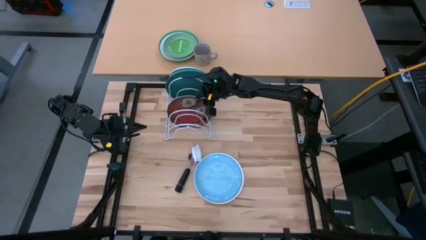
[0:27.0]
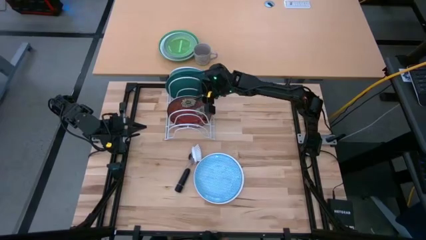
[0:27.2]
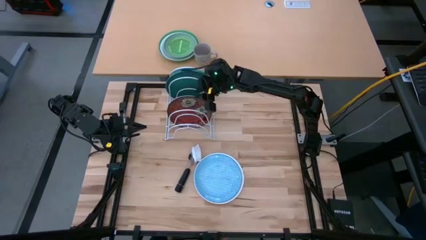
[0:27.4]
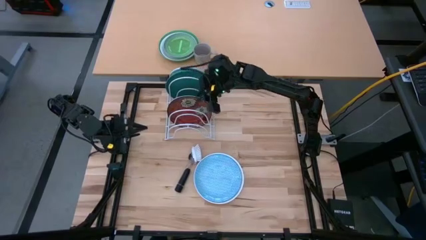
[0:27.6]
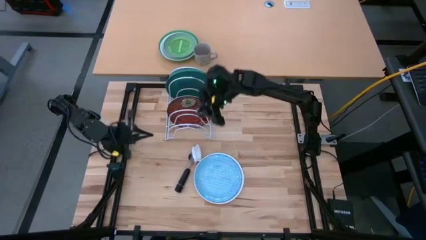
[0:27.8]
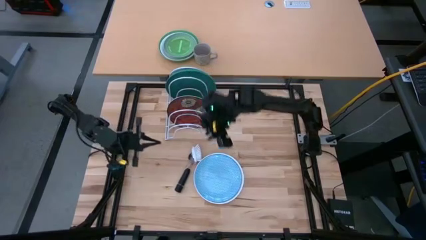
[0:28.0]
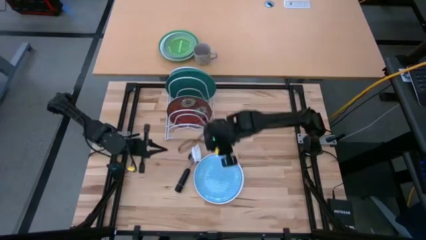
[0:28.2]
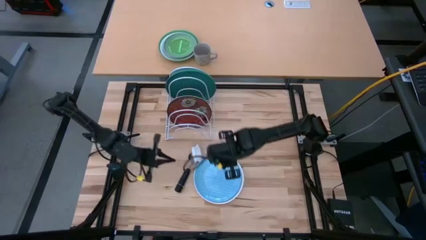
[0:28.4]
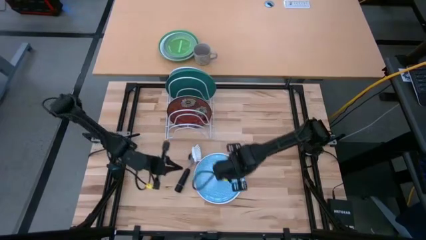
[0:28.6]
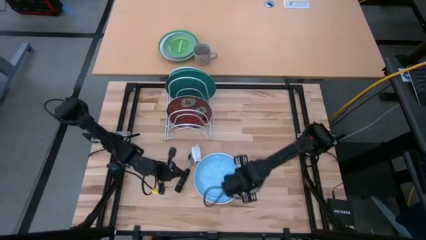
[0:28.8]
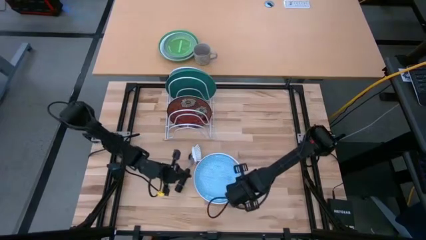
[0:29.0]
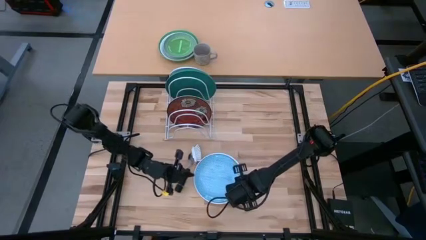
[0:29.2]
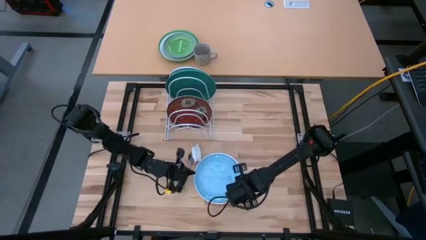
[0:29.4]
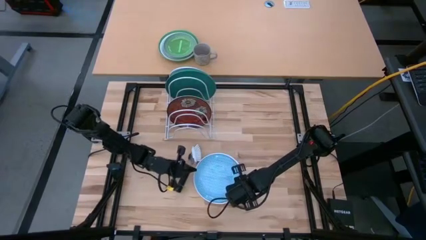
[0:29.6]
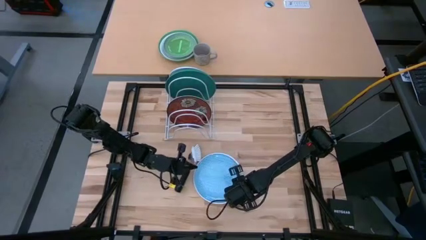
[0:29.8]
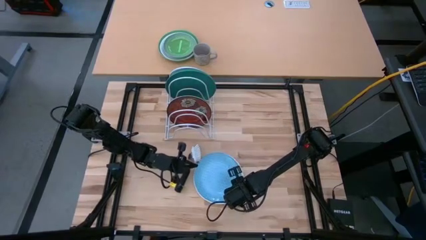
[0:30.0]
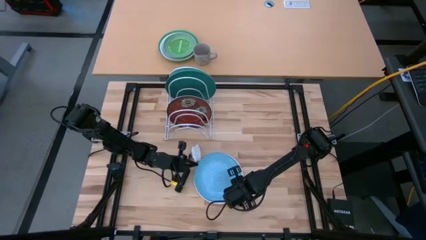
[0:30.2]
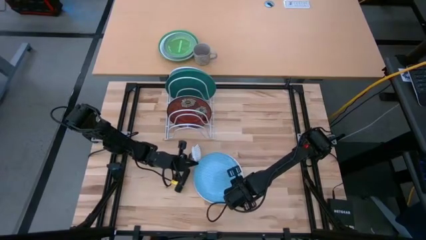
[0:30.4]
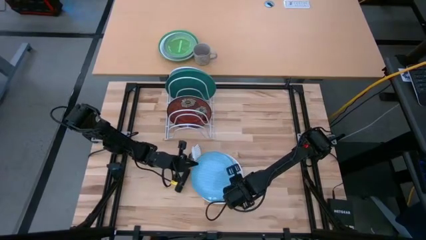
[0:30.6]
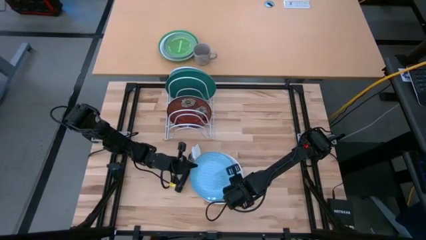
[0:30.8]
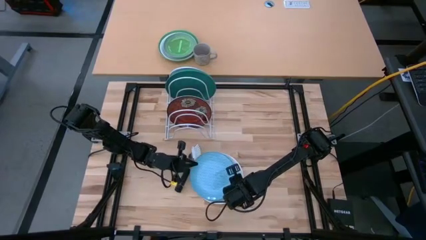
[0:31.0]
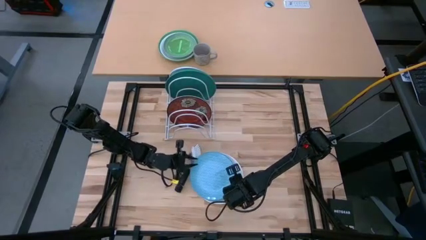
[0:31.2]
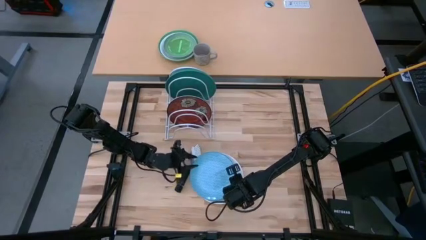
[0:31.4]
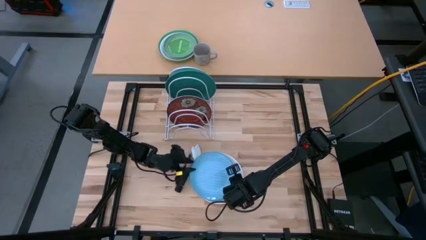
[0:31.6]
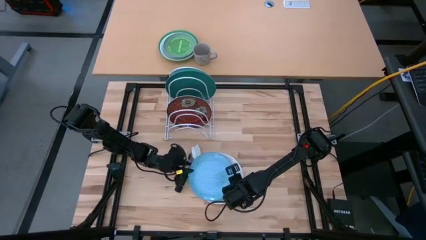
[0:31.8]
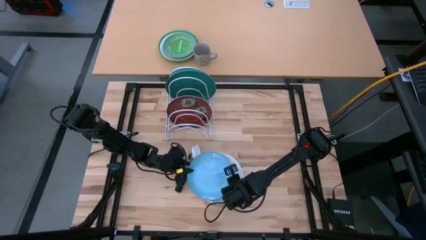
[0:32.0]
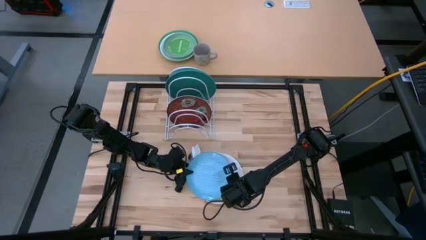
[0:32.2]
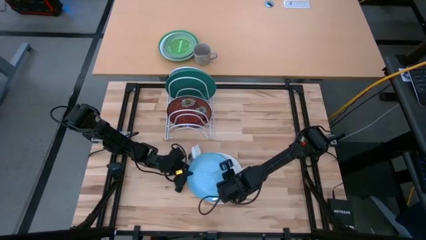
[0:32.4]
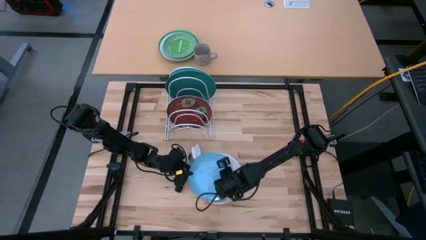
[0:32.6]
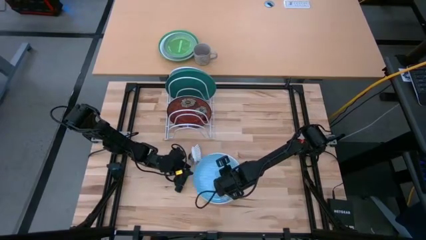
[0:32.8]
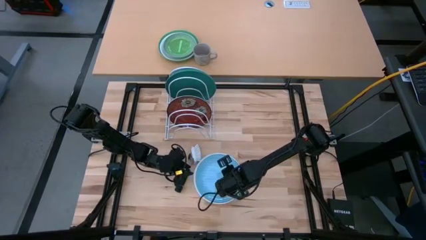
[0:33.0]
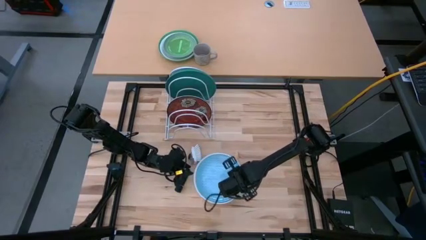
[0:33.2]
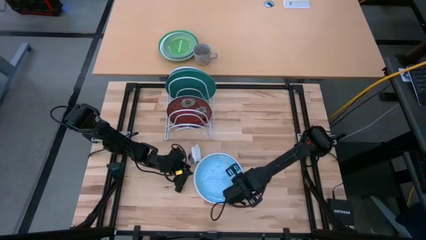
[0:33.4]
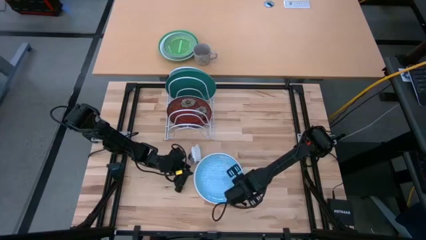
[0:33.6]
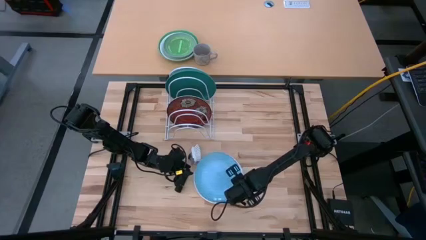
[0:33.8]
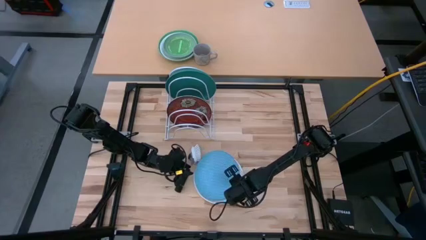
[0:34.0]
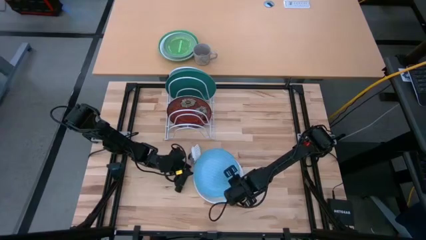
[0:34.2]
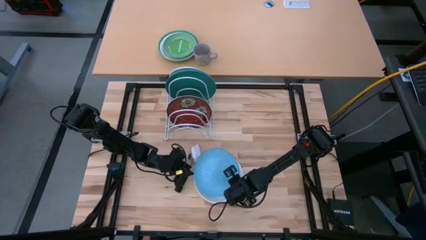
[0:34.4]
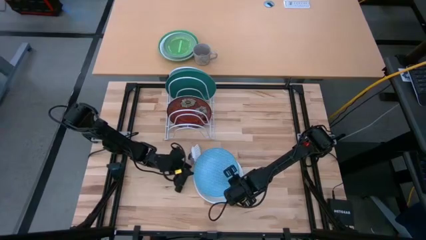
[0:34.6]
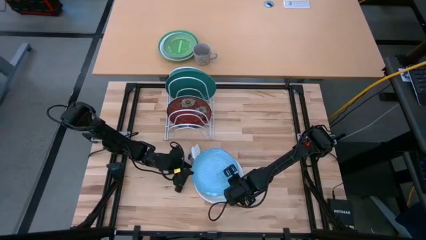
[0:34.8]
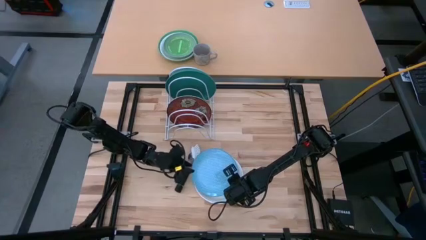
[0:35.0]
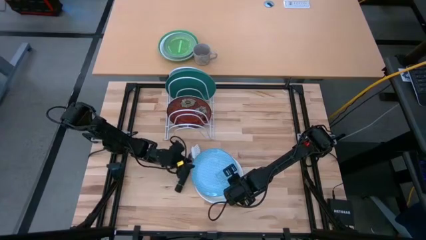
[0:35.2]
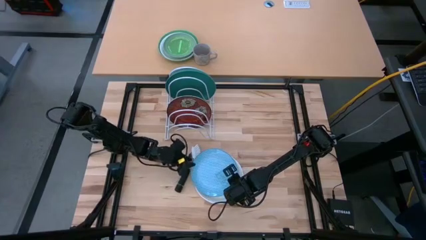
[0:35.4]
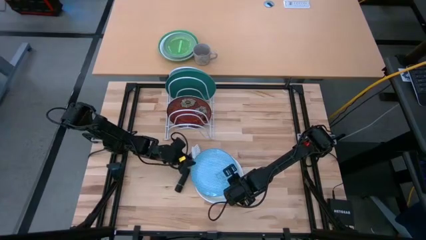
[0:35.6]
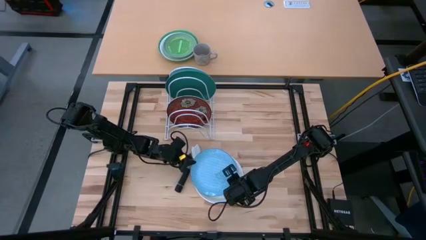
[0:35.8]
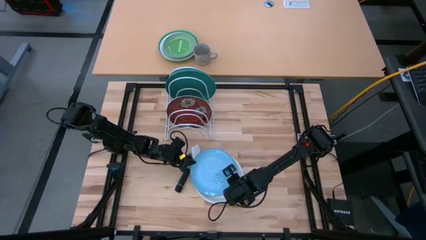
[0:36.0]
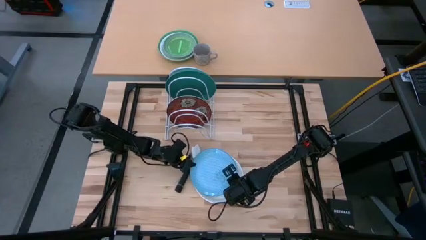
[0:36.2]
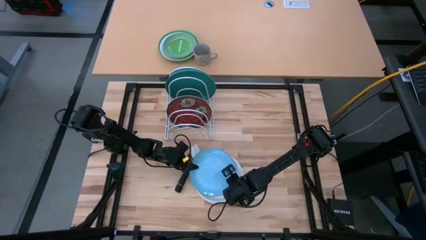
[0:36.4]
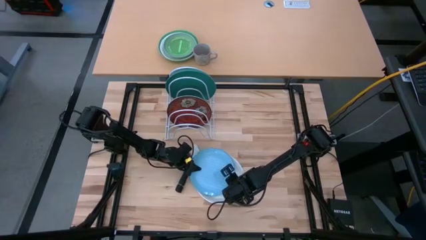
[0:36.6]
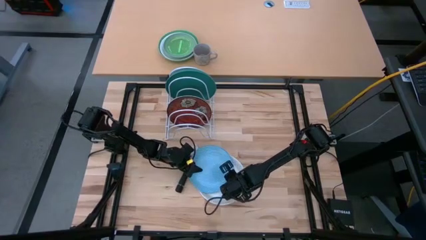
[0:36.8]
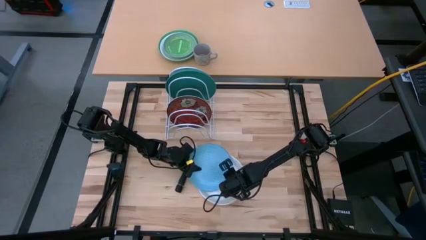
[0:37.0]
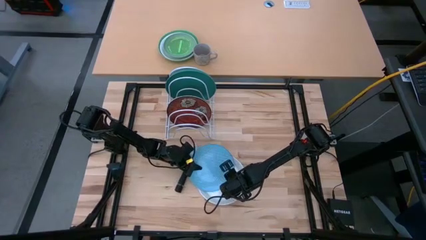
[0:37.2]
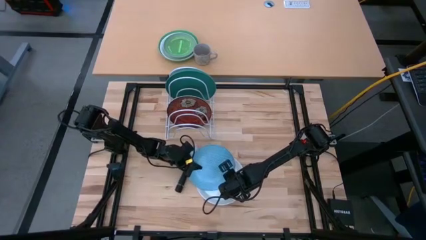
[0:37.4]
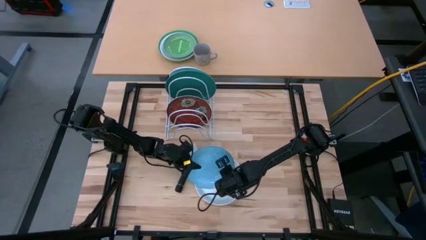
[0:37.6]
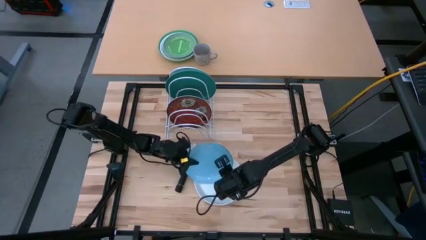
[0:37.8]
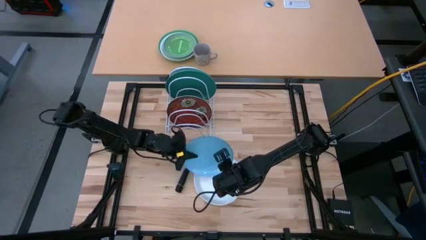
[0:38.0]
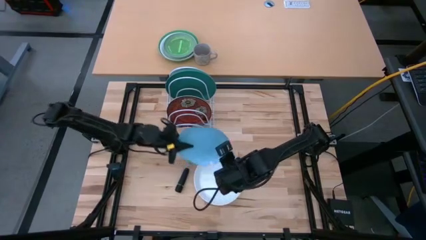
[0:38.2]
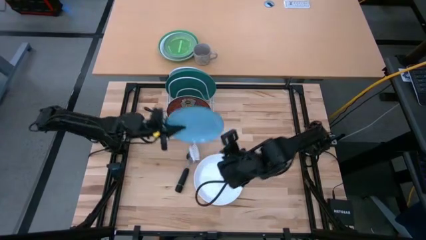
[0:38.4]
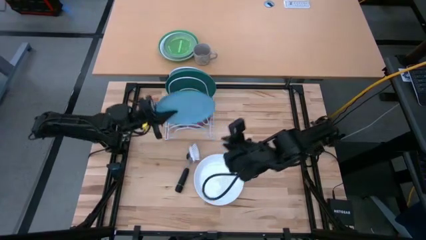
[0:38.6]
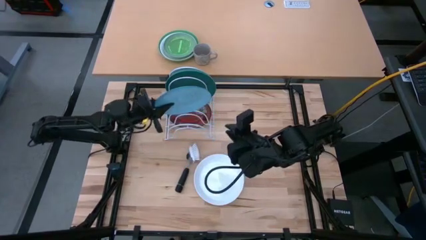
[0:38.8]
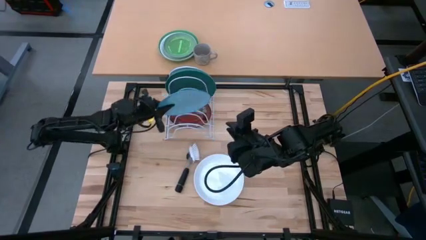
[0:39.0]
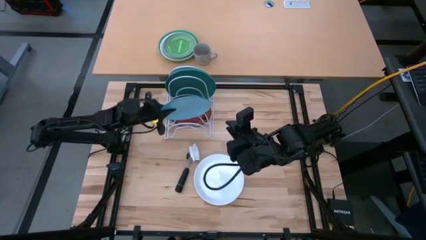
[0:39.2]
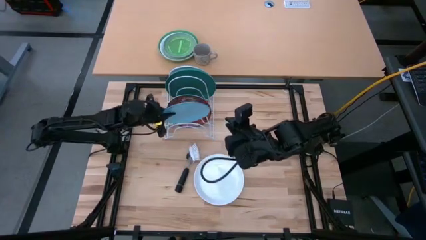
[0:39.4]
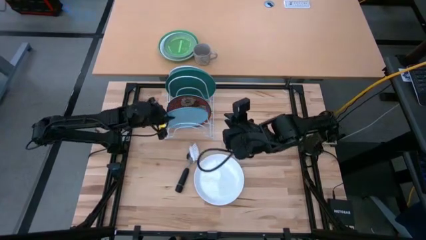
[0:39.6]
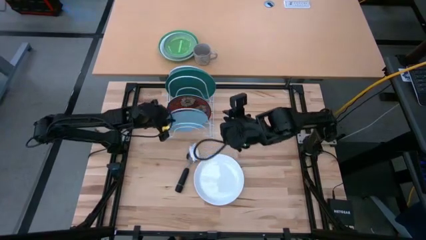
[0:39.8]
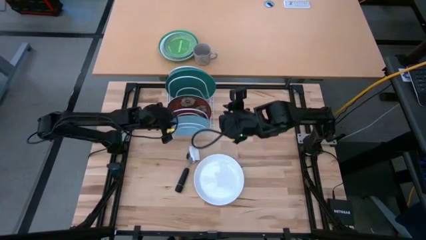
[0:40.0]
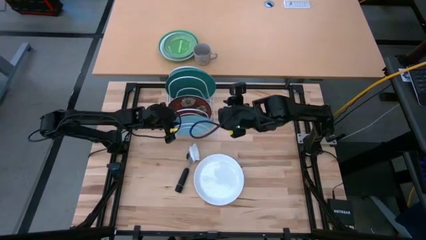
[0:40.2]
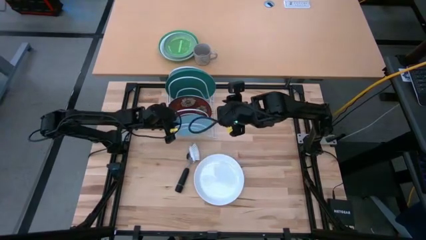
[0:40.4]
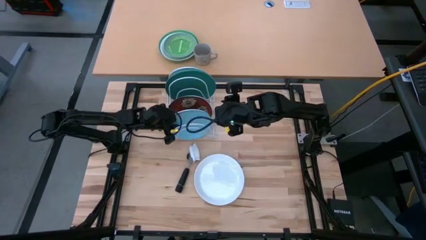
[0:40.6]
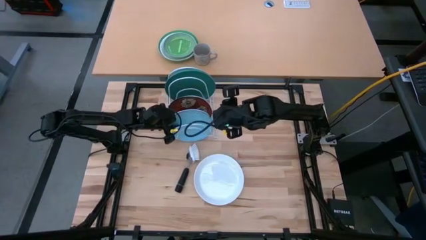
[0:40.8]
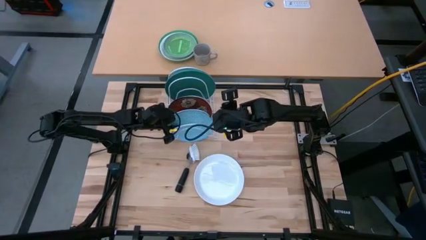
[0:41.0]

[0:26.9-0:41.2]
Task: Sort dishes
Put the blue plate into the white dish rack
